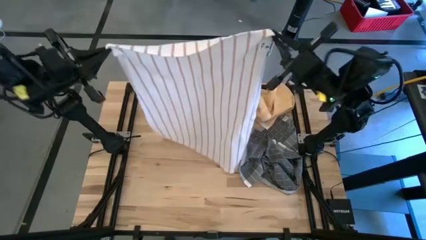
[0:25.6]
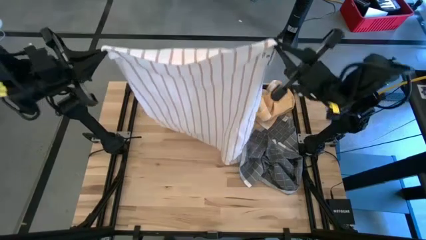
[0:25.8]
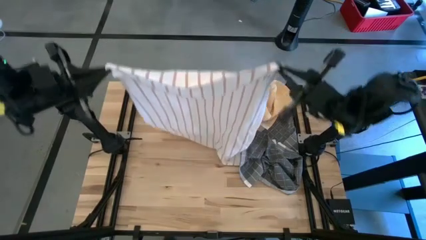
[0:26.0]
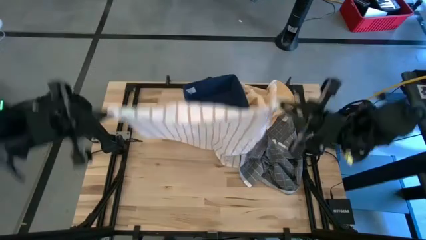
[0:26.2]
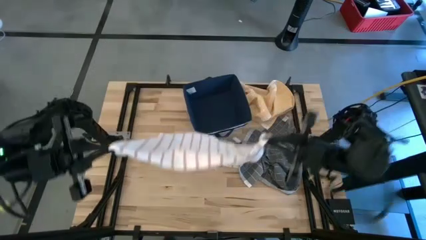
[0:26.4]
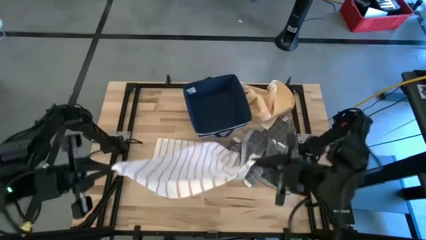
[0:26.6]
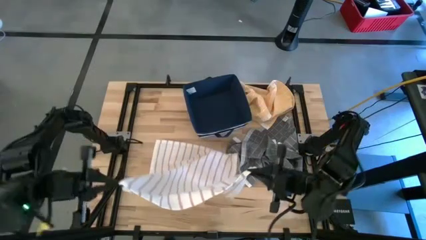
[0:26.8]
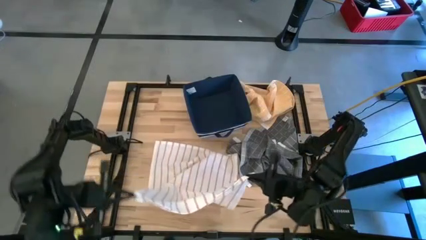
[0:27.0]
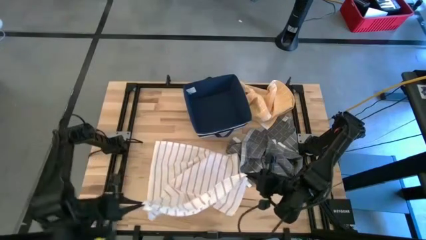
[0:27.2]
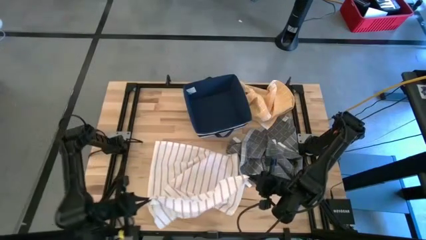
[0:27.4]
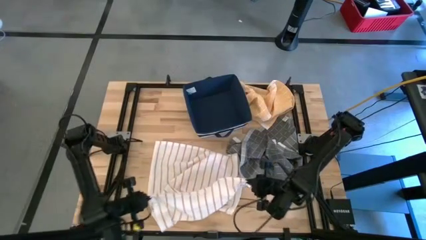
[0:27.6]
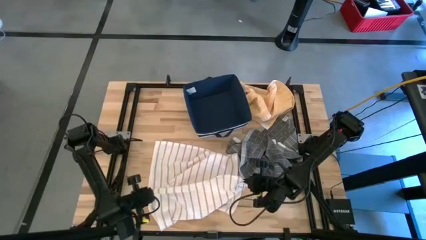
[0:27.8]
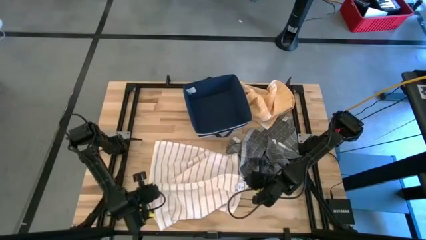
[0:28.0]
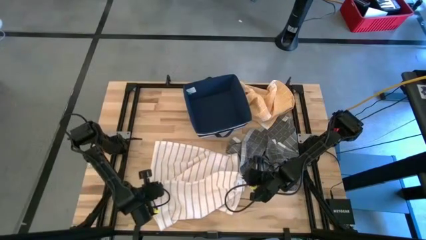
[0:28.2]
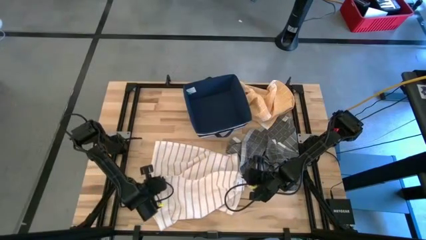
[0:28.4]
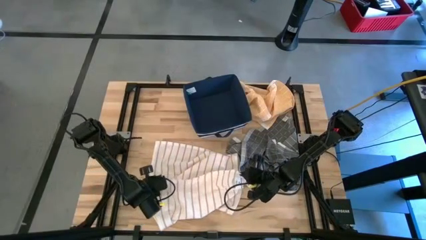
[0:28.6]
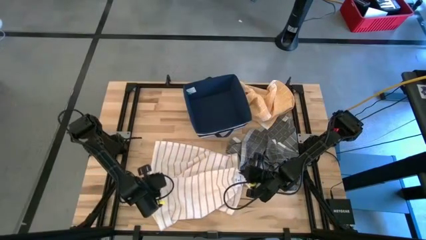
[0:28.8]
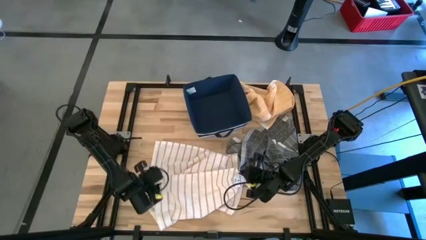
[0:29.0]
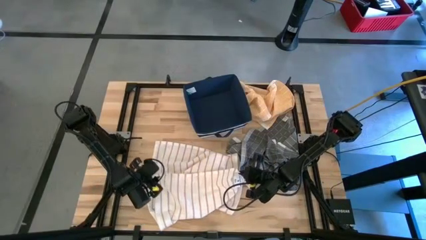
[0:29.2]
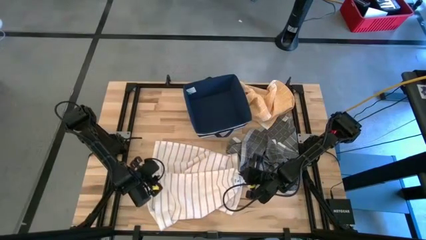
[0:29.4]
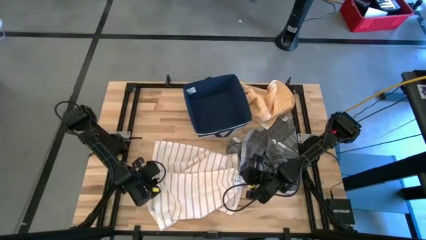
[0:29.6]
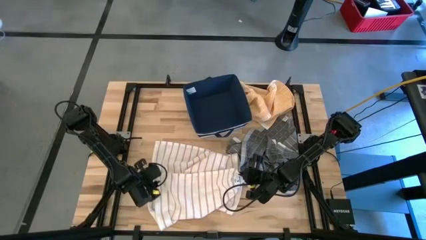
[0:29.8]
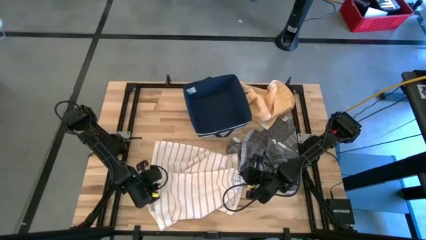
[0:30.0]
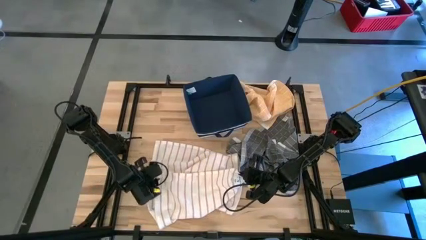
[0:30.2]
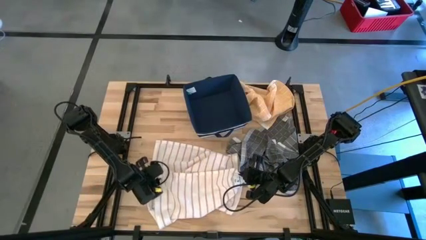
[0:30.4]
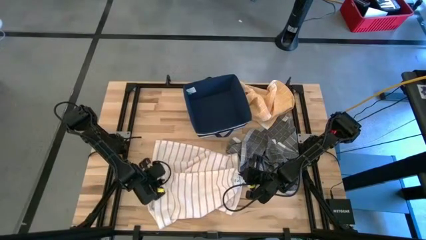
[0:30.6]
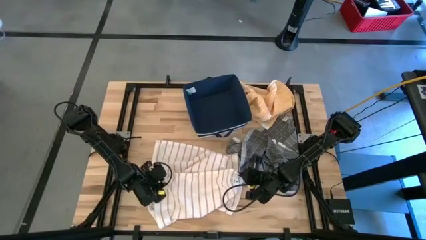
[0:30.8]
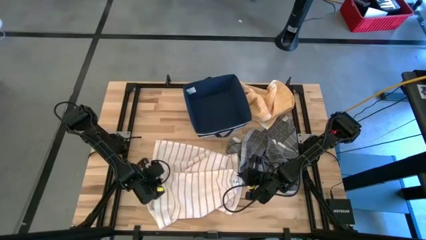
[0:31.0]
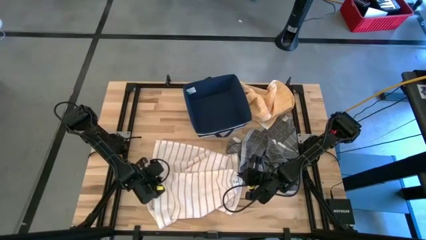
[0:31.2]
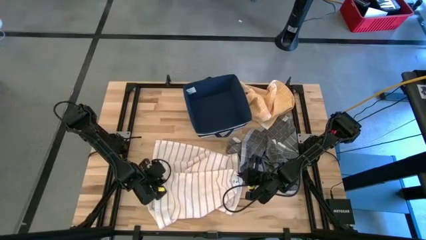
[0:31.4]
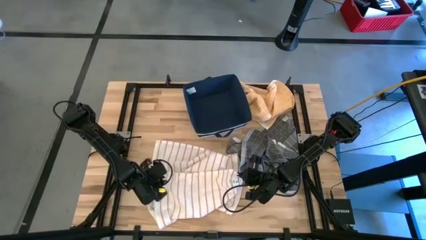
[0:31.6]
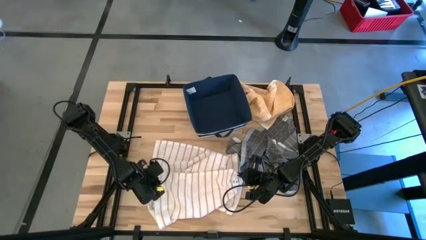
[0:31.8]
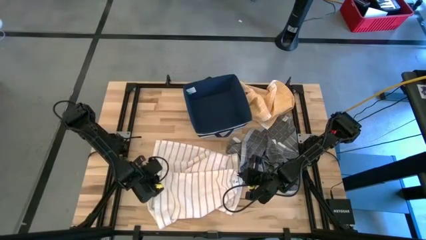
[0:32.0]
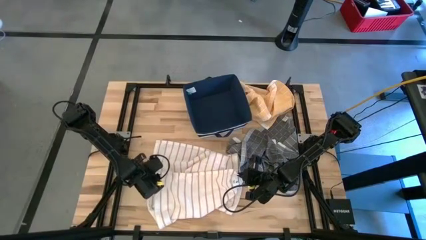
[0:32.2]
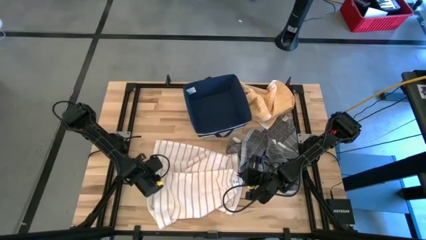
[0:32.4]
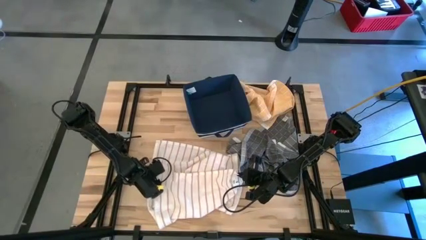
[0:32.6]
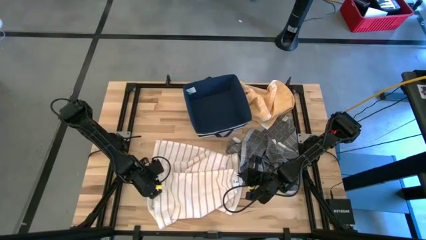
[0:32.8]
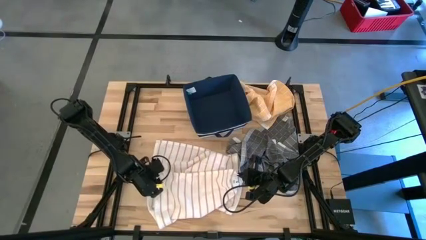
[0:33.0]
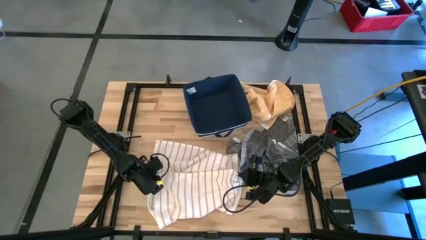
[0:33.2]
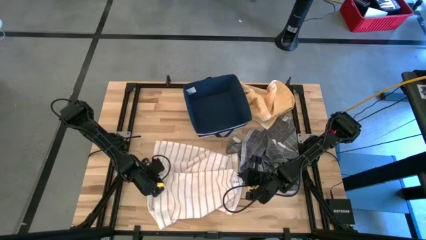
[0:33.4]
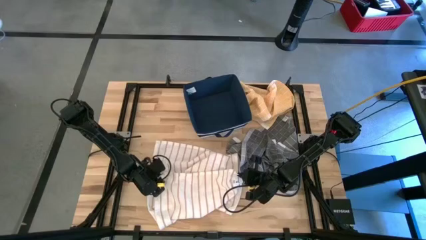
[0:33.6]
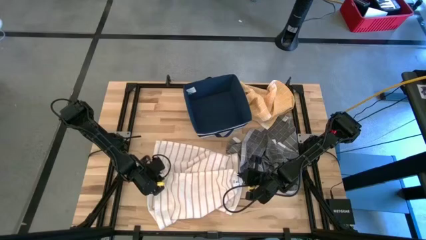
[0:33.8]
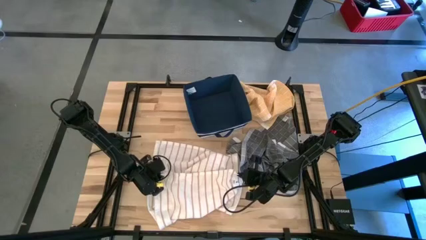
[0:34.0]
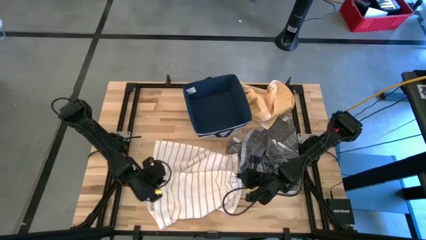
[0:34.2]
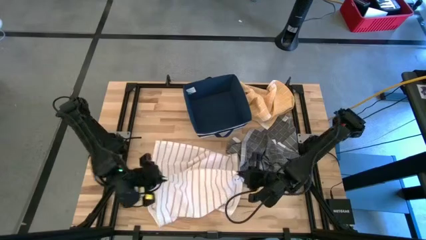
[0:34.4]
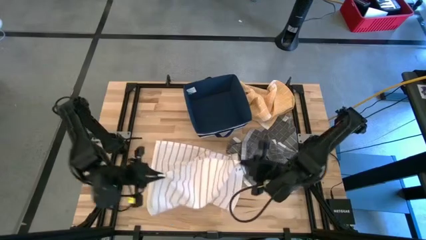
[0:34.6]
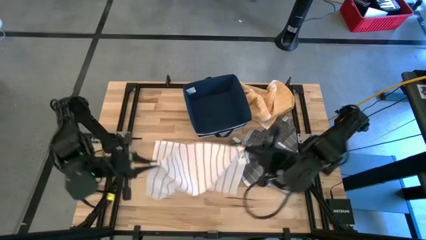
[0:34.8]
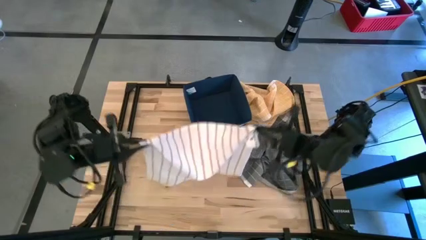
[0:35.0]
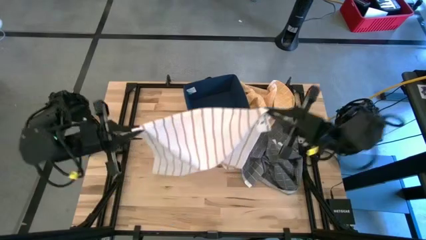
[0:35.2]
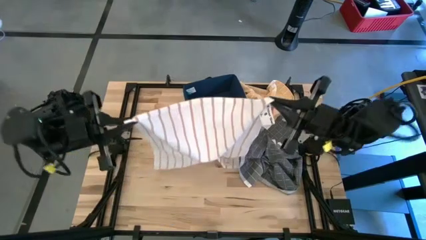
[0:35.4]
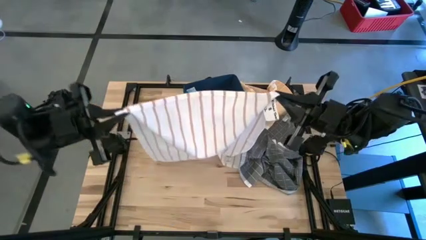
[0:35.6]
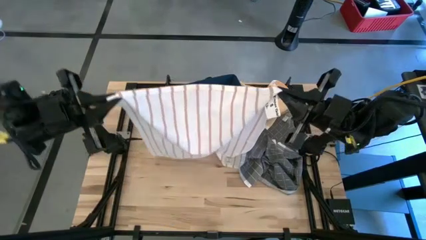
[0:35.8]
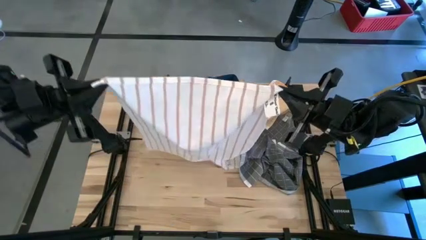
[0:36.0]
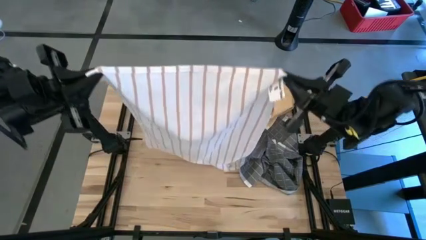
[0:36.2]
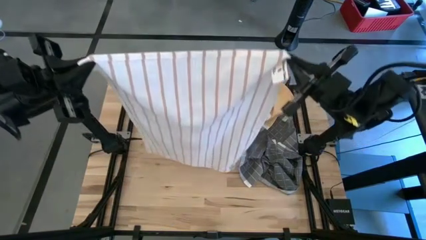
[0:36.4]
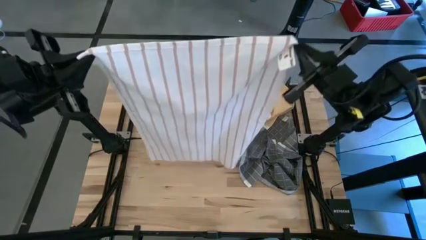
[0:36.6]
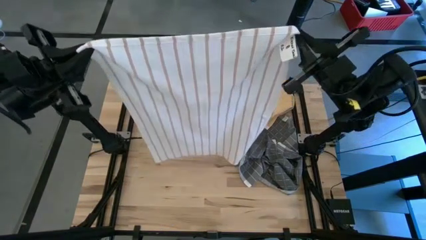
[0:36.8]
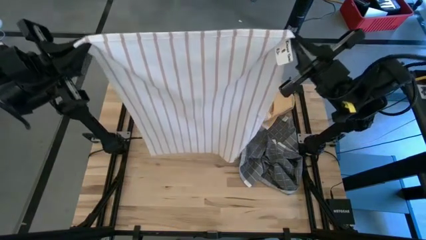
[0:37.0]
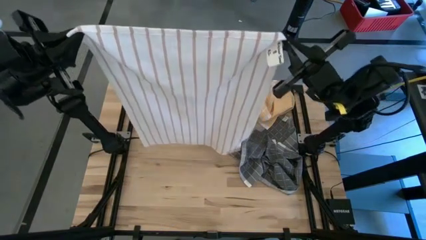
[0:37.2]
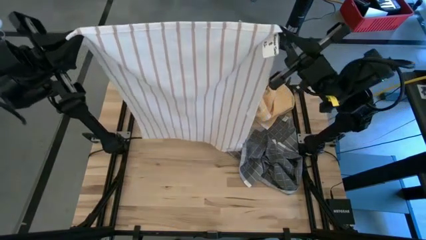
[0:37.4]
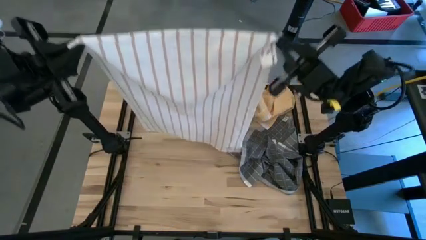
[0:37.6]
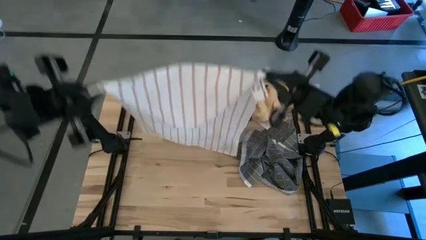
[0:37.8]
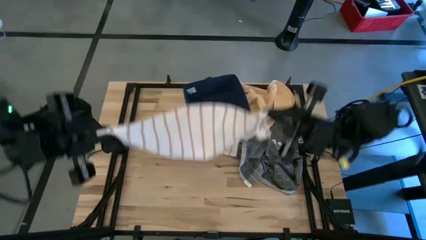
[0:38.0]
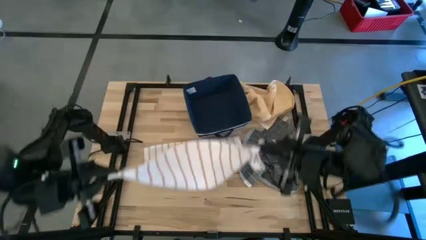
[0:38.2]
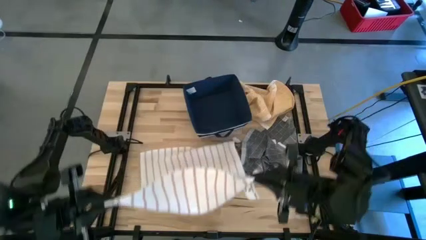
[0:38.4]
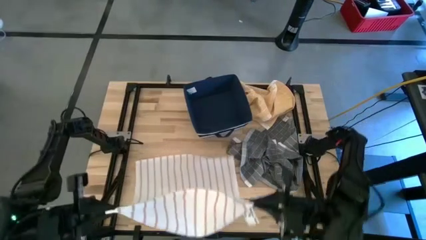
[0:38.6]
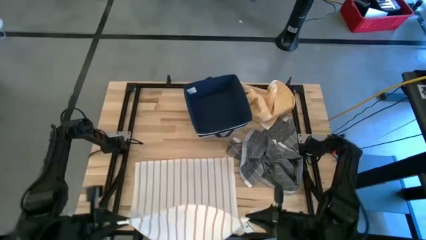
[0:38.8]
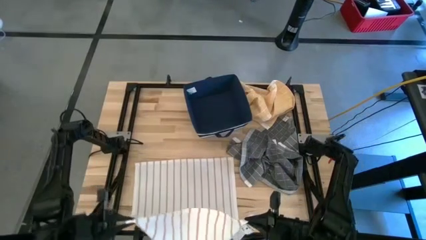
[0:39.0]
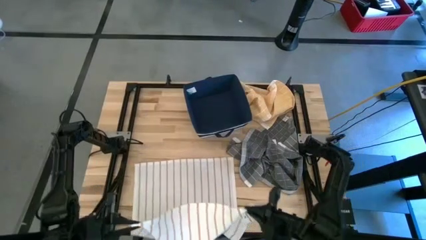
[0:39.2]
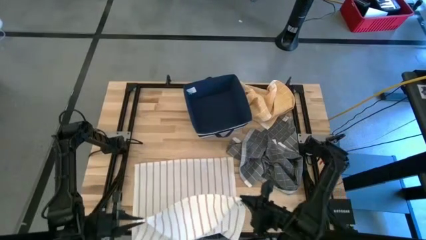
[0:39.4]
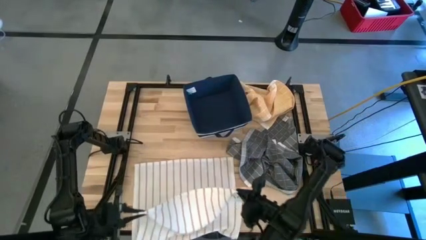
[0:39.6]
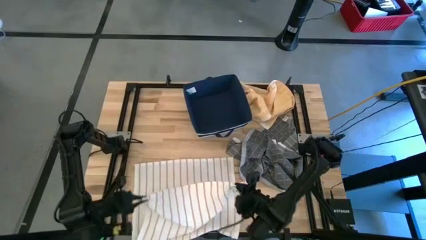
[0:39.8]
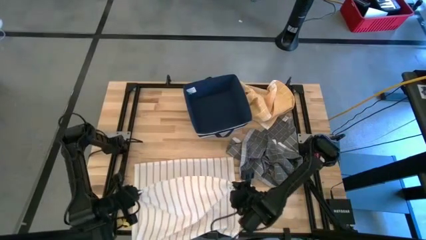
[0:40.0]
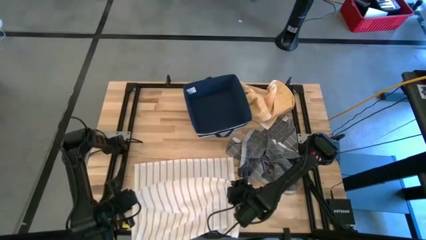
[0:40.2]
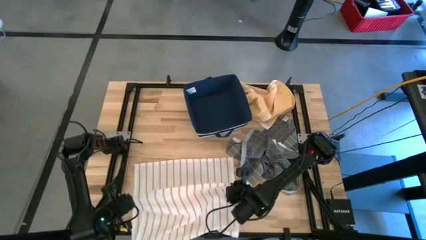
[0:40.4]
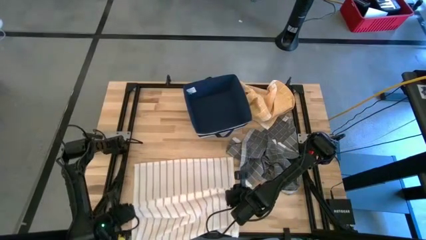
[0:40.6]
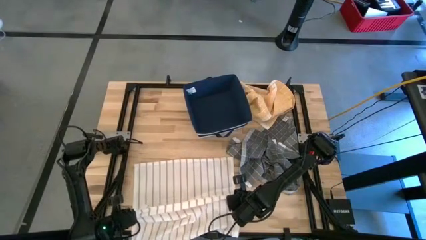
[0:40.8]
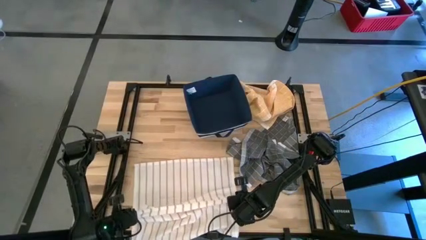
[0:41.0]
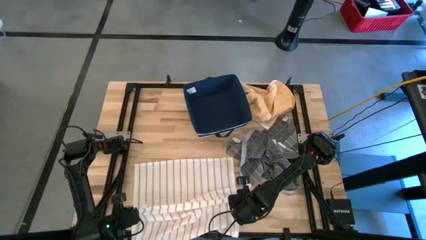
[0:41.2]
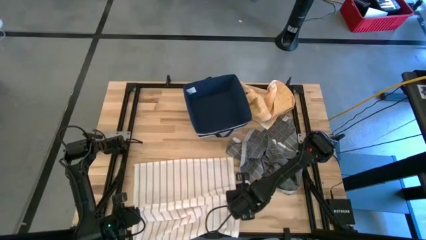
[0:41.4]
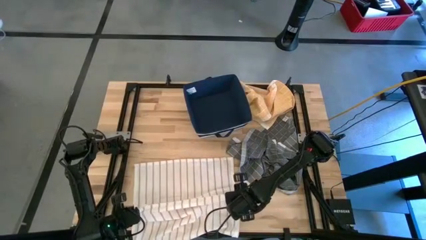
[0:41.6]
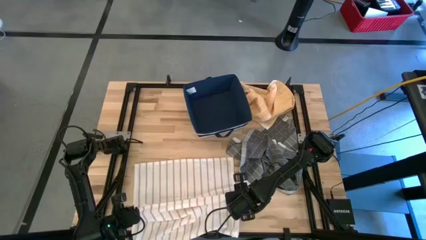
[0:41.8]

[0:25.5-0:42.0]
Task: Fold towel
Fold the white towel
